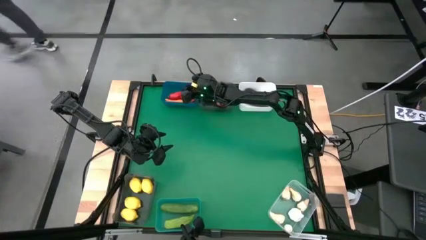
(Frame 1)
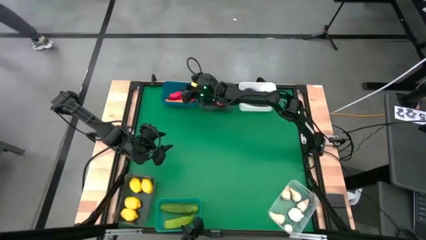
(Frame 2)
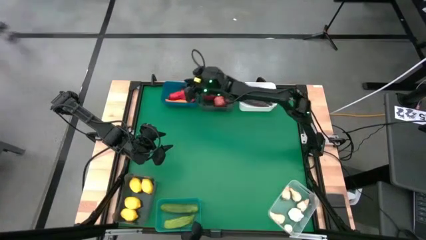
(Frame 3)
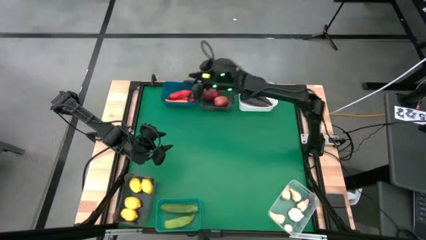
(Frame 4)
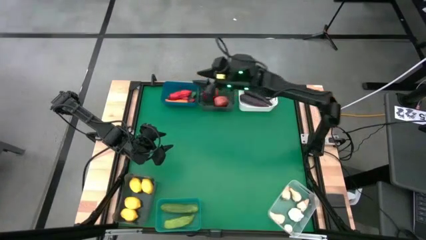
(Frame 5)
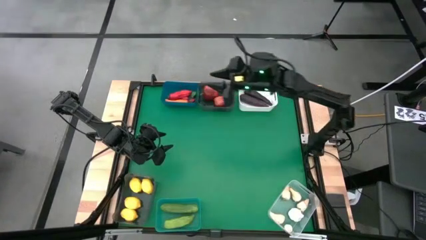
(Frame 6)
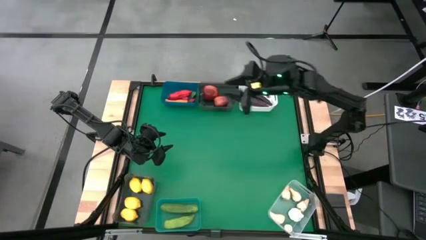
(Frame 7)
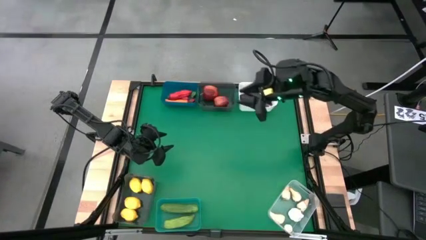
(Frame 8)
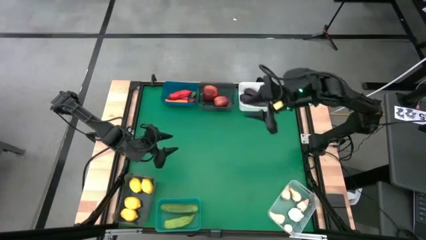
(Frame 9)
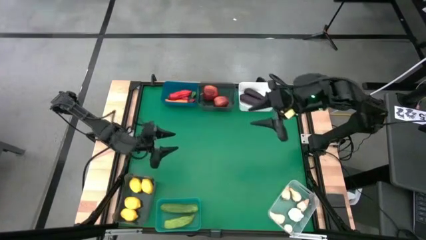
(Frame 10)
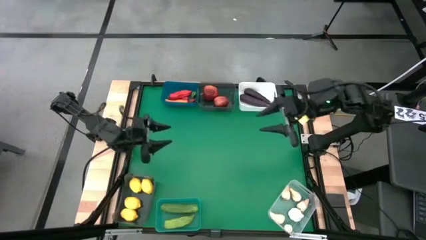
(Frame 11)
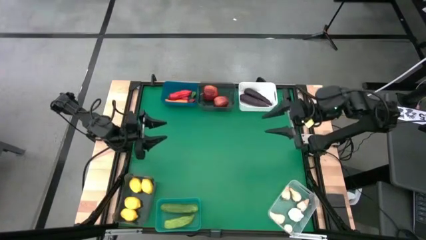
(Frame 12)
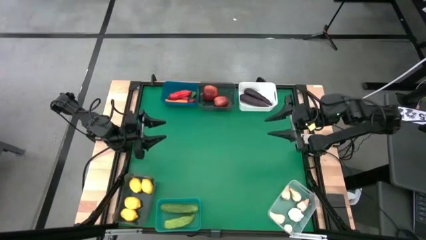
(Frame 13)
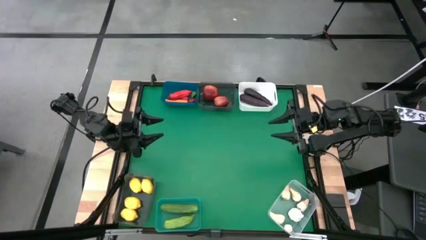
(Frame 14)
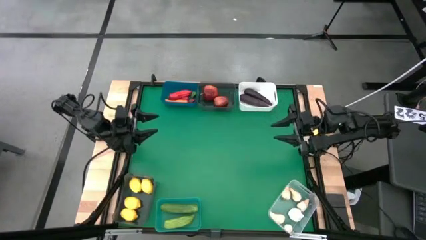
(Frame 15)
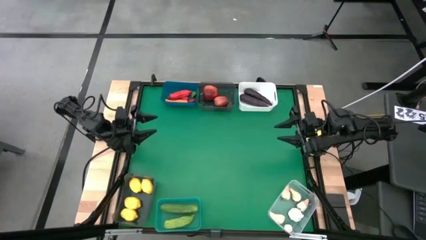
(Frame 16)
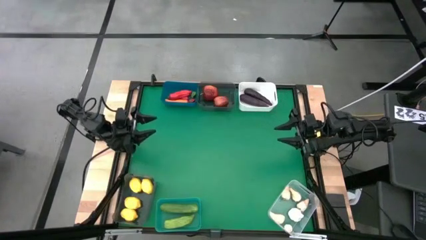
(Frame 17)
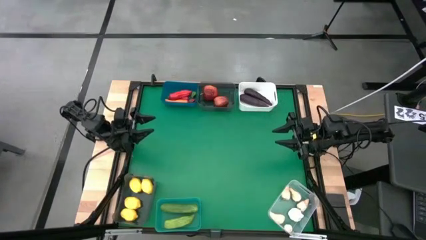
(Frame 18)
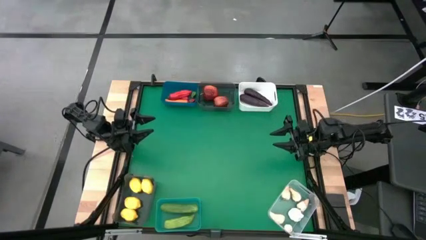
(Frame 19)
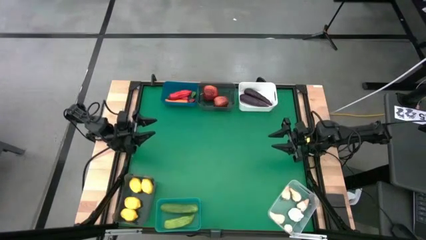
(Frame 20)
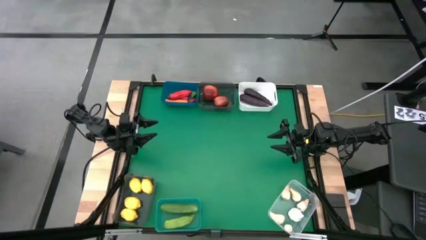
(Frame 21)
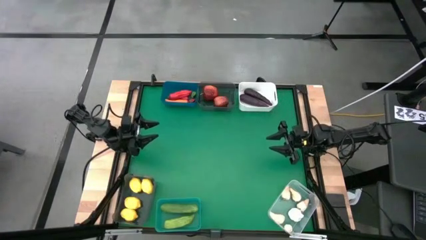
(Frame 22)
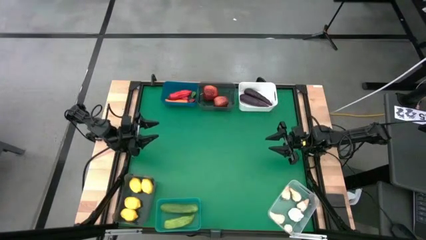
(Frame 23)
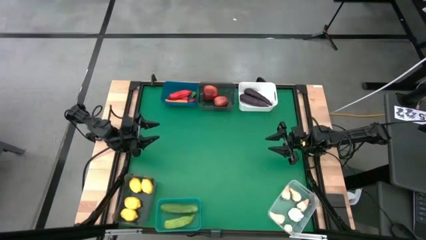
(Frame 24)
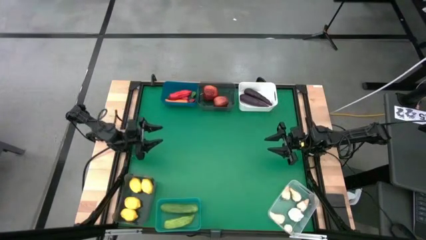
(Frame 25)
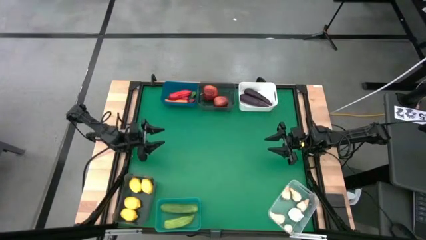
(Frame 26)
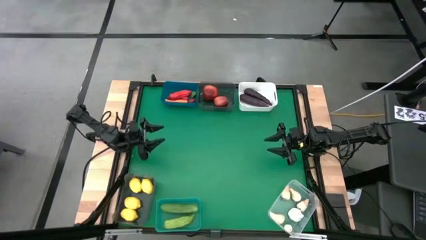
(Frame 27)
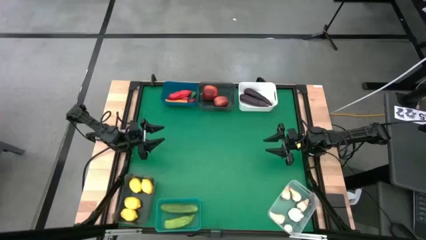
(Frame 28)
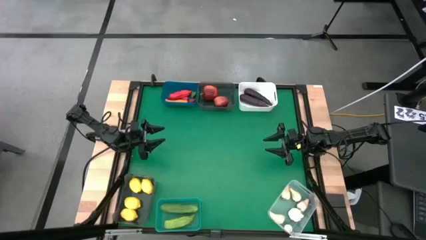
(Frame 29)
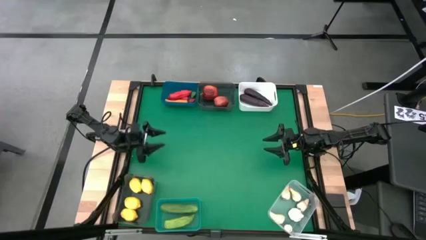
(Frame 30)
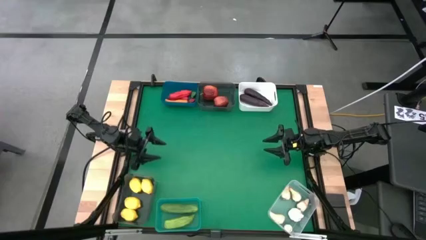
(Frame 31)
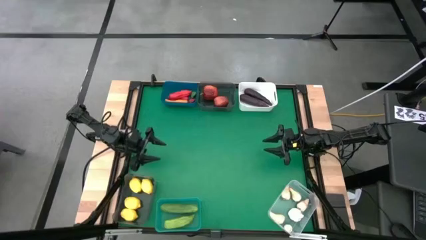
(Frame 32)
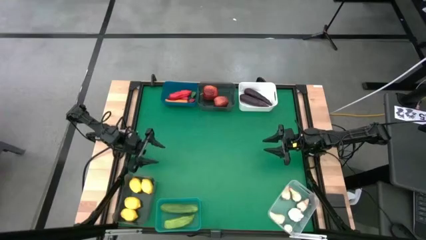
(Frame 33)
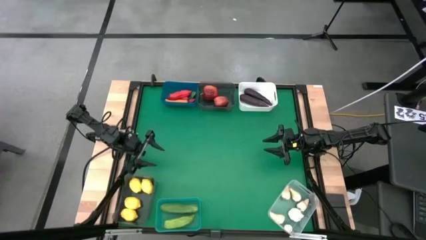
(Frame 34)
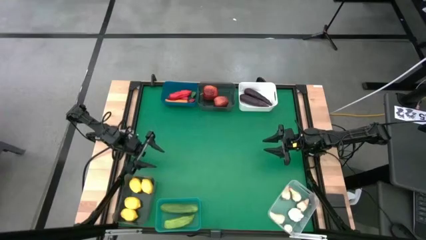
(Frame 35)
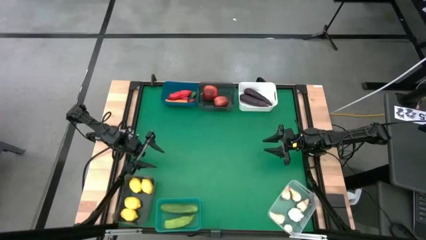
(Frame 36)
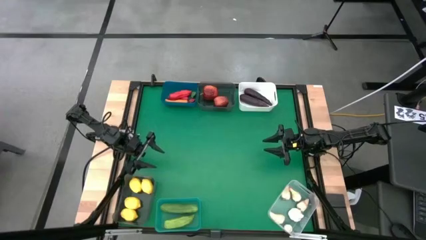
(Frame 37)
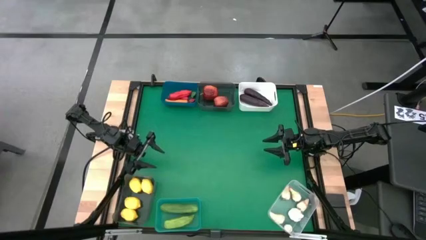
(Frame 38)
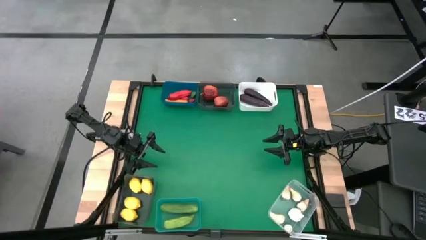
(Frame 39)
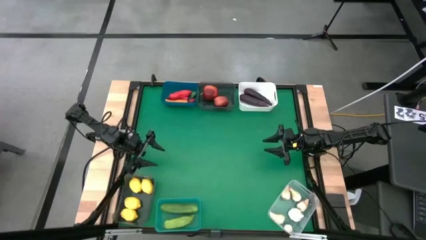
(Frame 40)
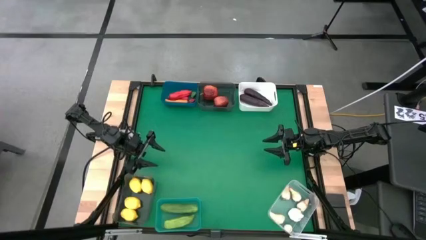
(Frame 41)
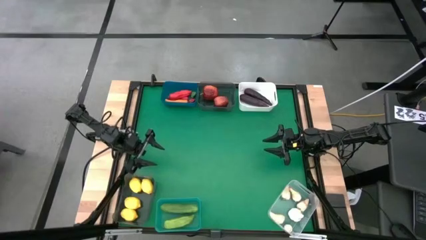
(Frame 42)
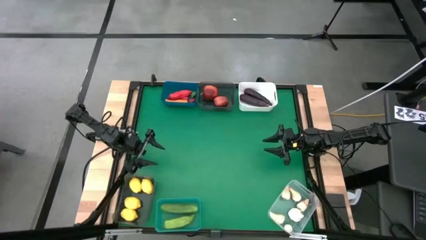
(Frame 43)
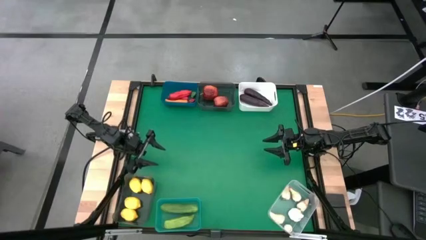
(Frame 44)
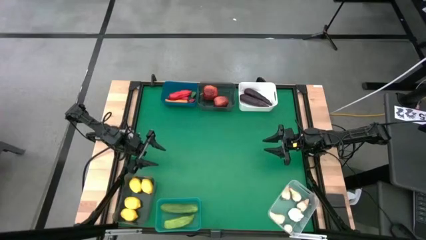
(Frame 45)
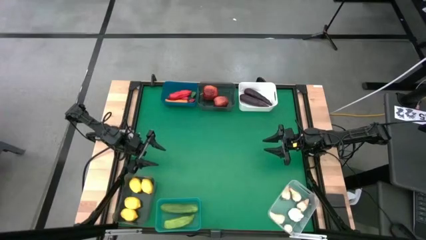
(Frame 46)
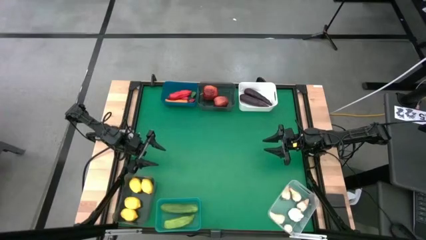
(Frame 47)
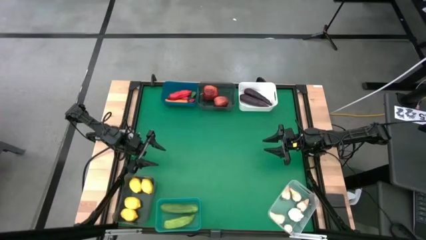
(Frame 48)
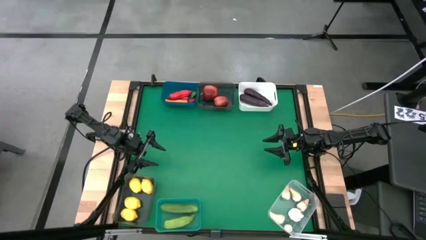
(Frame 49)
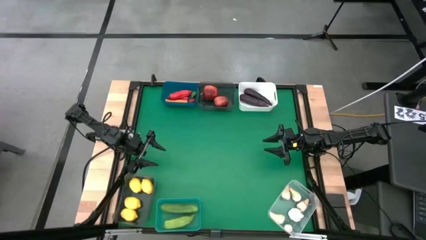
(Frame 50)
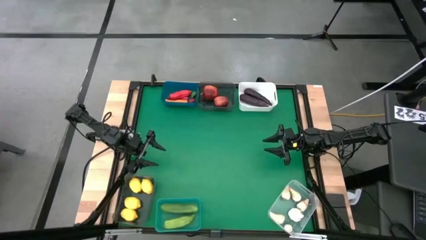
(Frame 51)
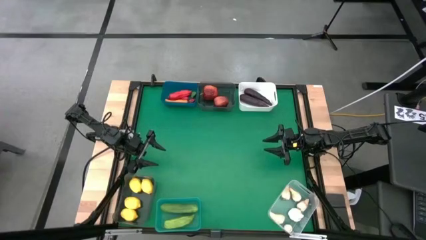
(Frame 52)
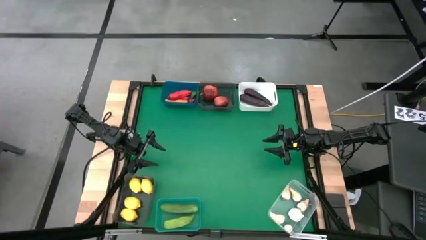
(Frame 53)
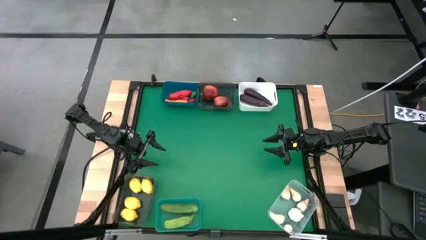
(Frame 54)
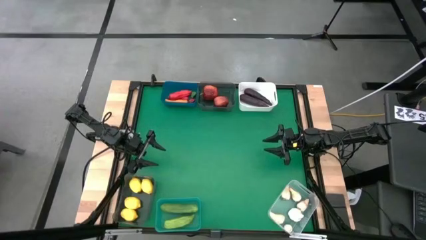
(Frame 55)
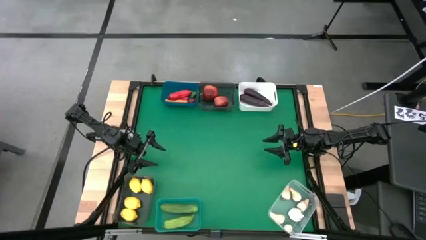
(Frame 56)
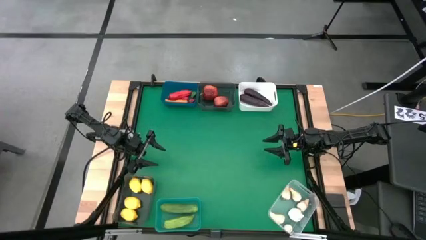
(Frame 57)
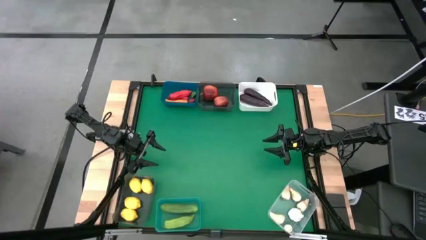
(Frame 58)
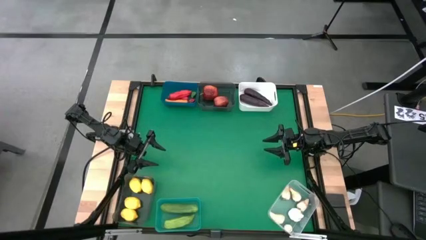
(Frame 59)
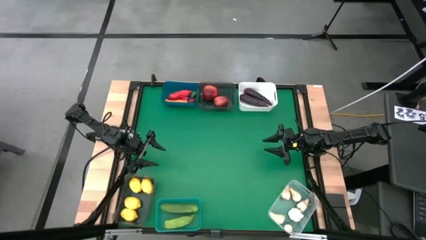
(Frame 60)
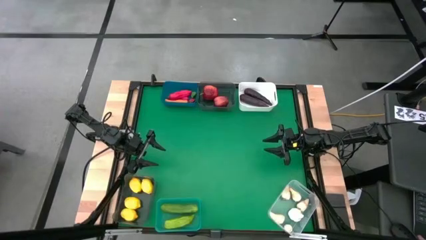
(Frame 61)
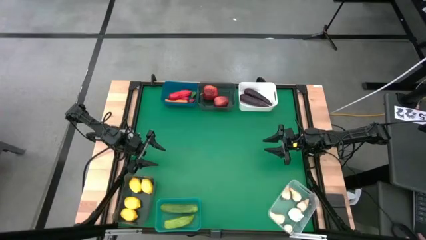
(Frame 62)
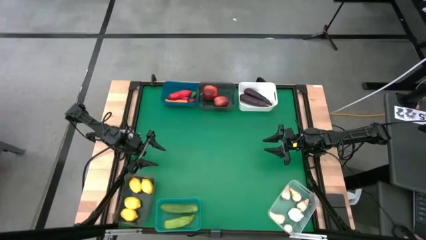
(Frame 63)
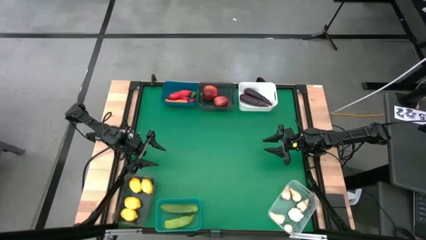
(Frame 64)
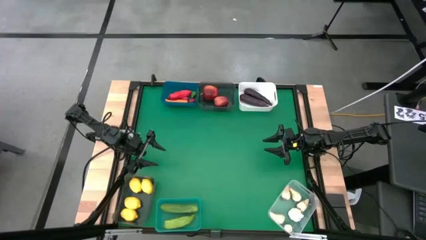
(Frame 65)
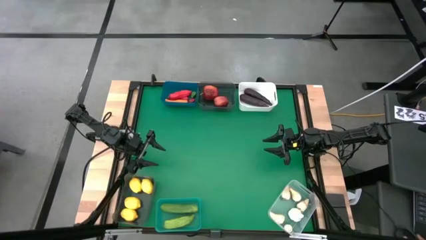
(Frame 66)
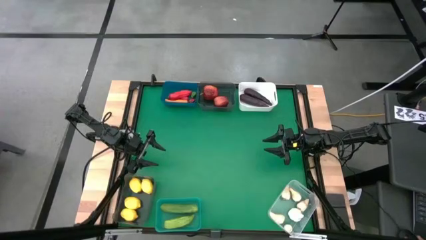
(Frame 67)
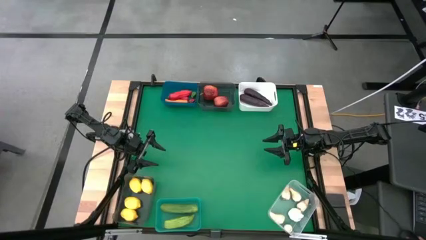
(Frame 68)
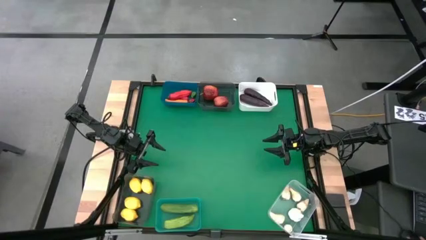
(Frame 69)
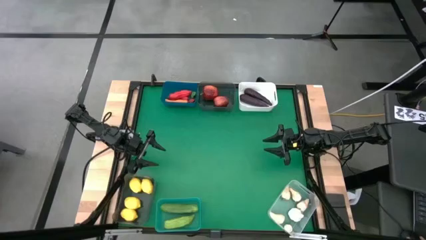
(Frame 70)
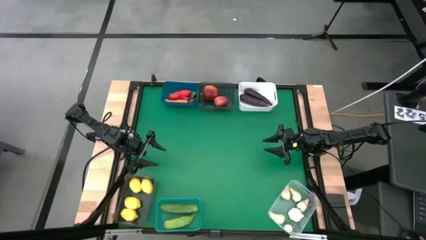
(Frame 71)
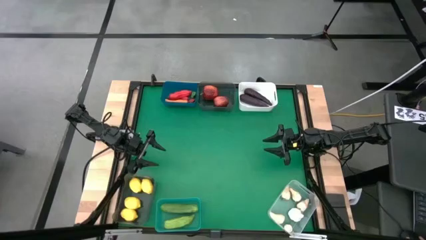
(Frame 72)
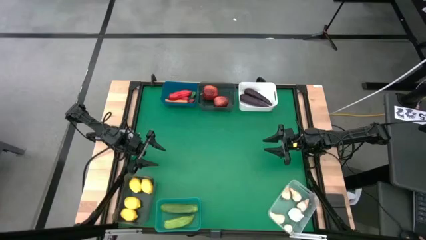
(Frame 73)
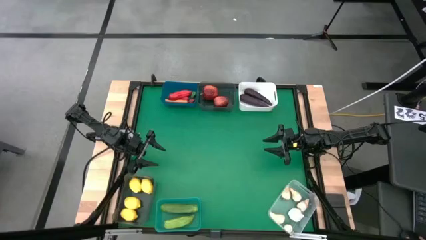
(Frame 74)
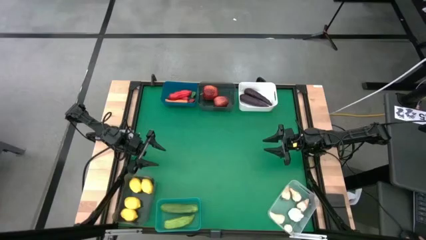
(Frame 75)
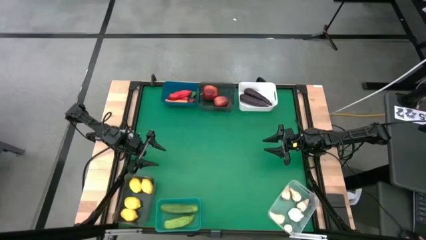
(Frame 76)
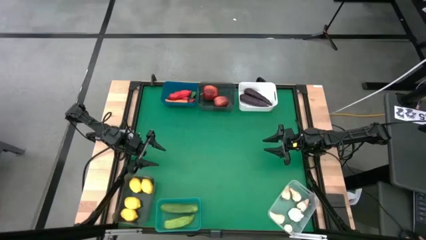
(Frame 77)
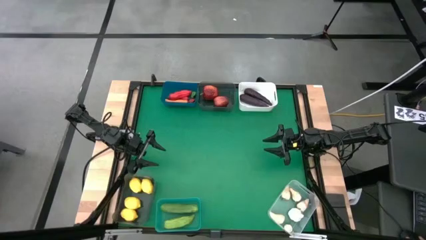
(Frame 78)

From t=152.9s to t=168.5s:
Task: Sort produce into baskets
Return to Home Position
